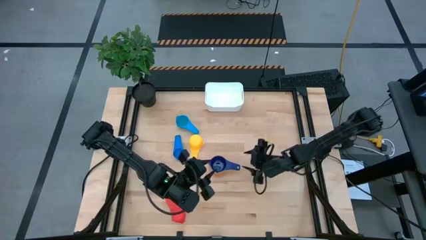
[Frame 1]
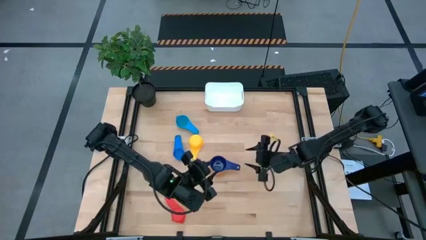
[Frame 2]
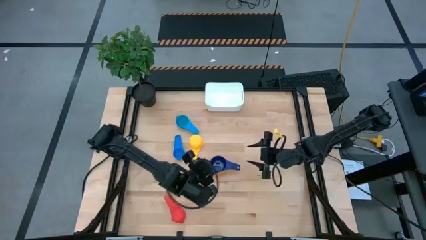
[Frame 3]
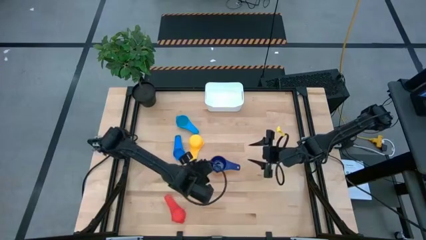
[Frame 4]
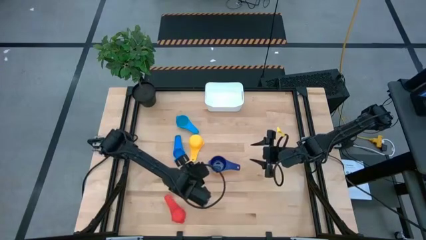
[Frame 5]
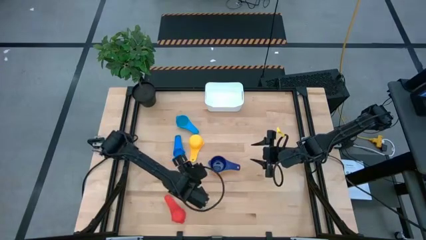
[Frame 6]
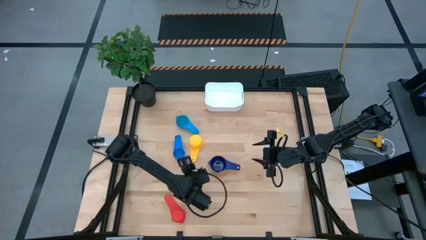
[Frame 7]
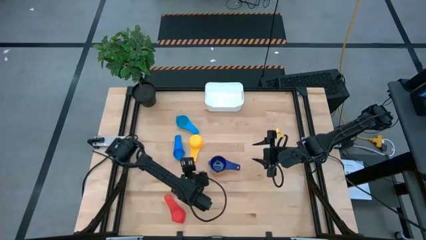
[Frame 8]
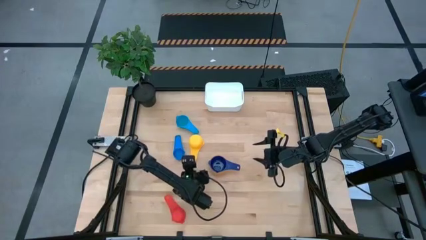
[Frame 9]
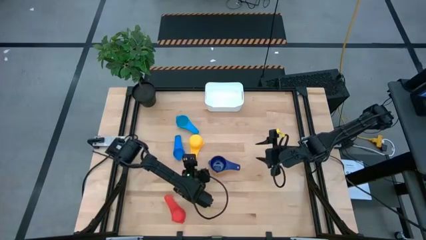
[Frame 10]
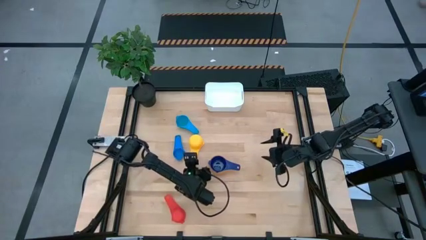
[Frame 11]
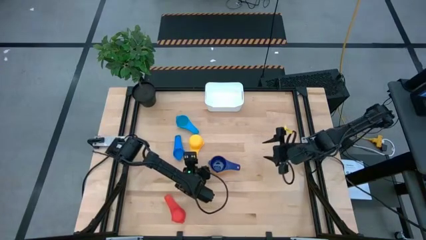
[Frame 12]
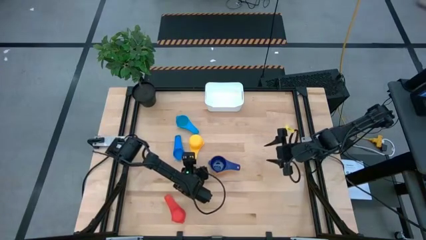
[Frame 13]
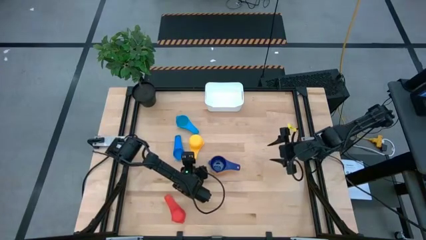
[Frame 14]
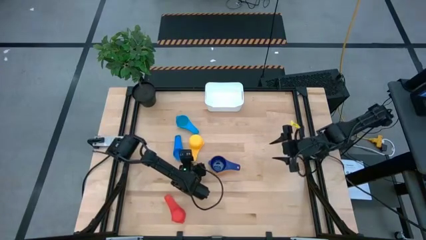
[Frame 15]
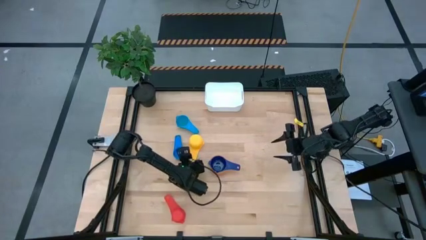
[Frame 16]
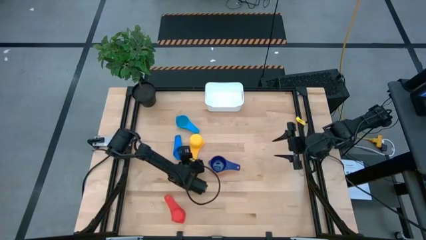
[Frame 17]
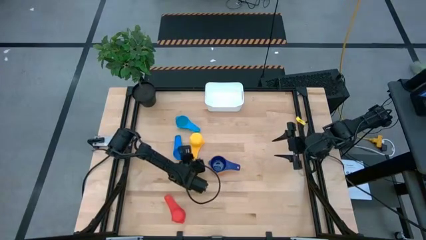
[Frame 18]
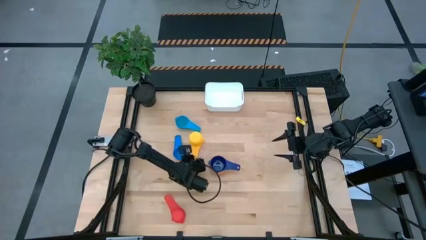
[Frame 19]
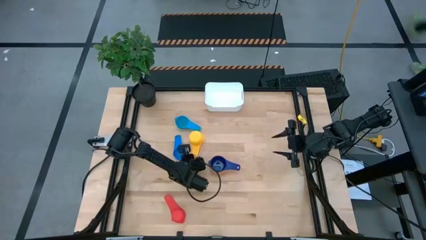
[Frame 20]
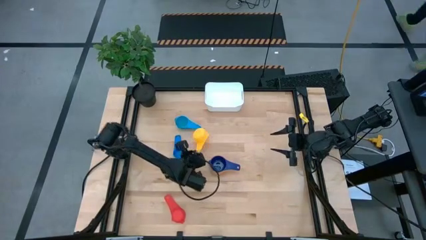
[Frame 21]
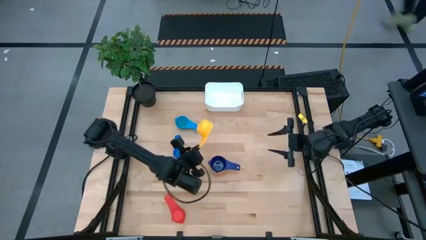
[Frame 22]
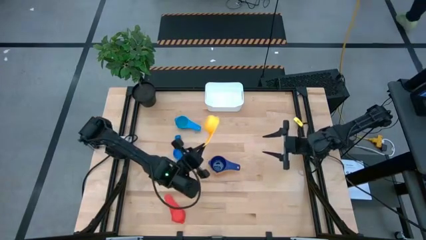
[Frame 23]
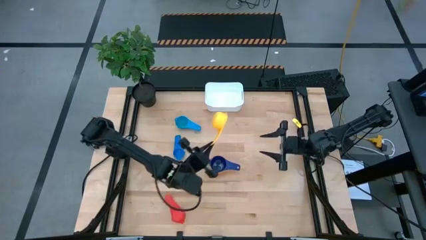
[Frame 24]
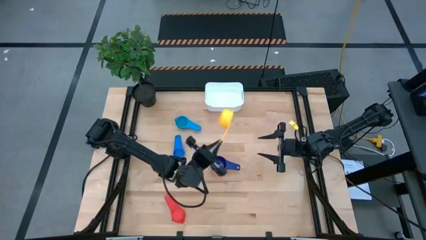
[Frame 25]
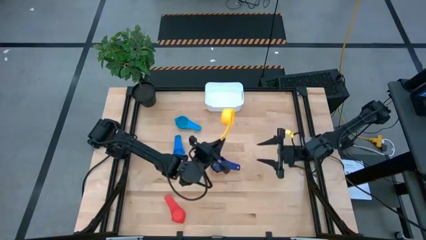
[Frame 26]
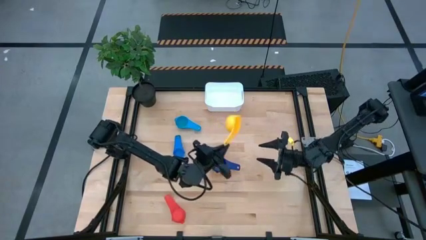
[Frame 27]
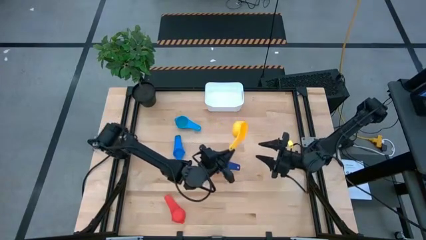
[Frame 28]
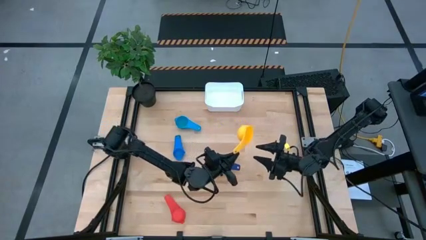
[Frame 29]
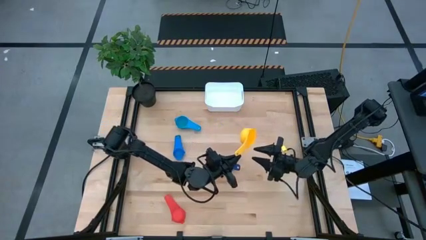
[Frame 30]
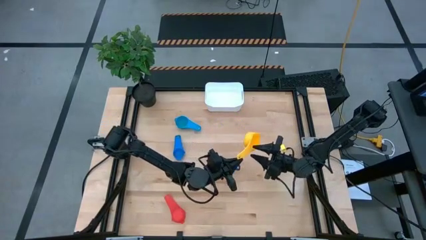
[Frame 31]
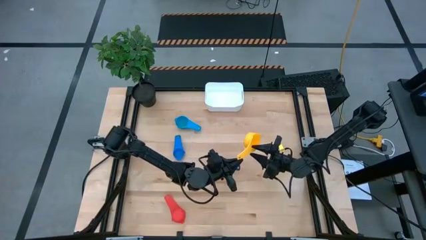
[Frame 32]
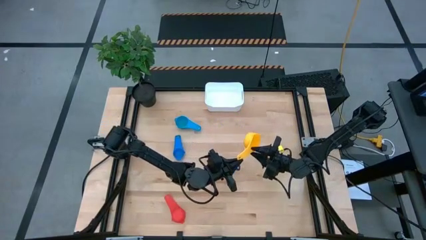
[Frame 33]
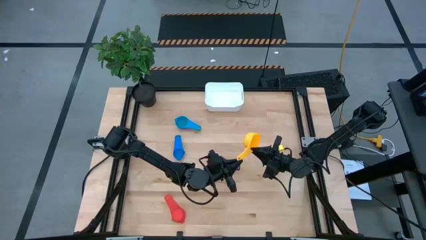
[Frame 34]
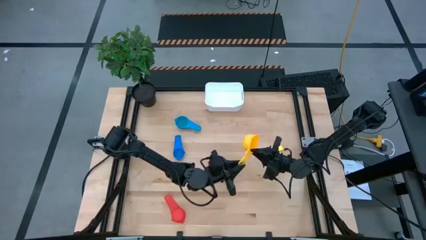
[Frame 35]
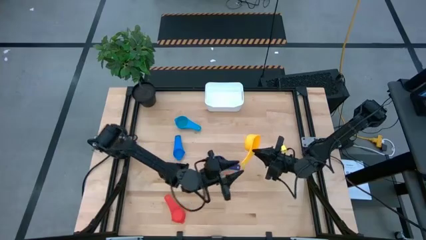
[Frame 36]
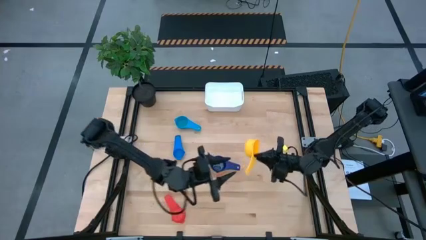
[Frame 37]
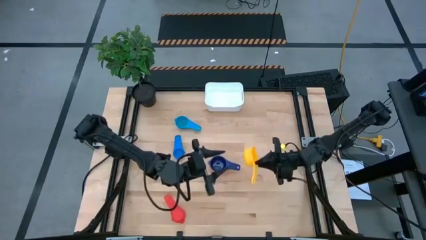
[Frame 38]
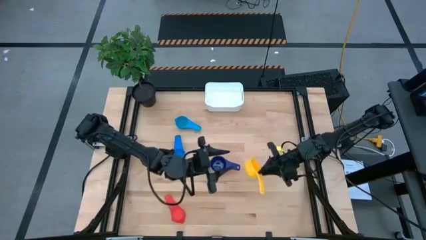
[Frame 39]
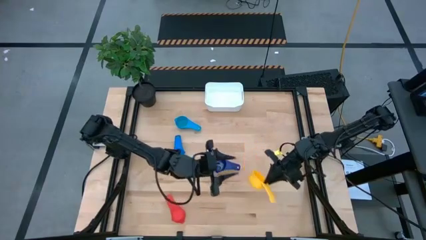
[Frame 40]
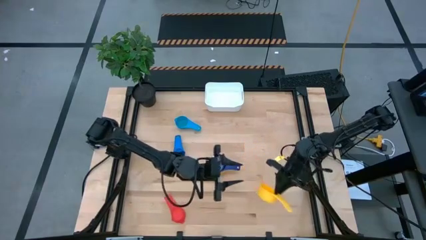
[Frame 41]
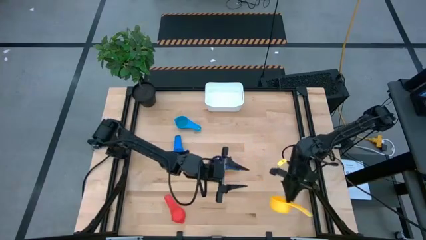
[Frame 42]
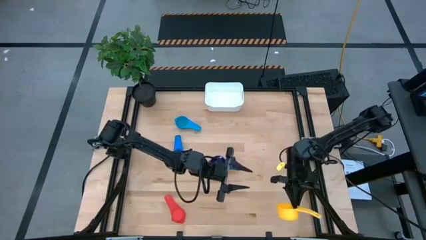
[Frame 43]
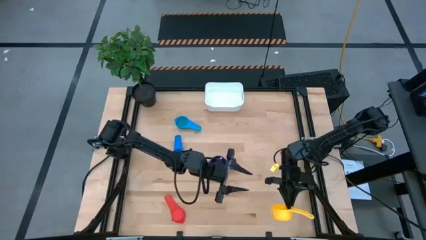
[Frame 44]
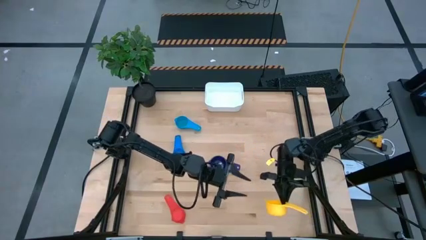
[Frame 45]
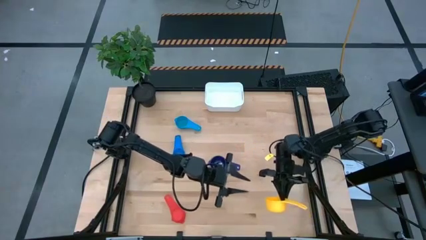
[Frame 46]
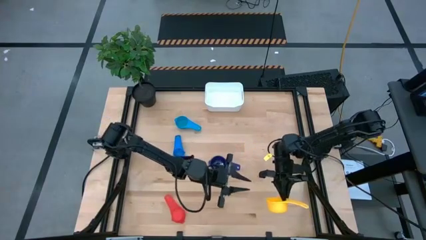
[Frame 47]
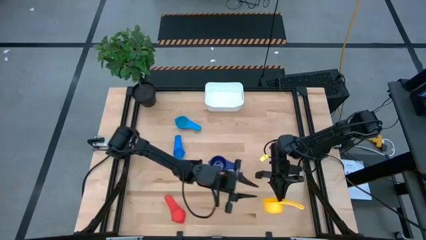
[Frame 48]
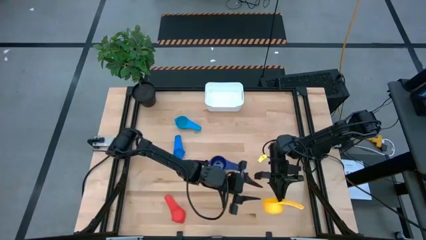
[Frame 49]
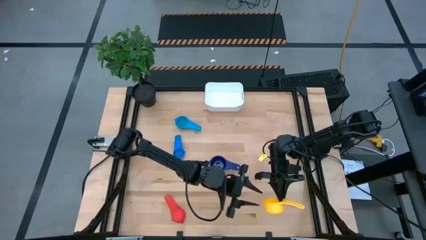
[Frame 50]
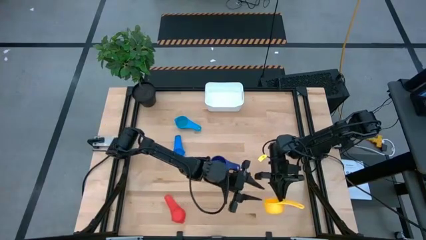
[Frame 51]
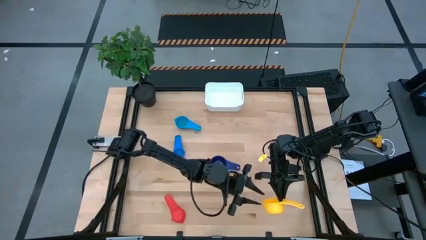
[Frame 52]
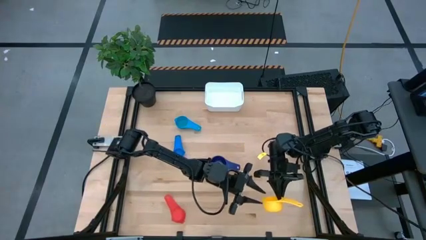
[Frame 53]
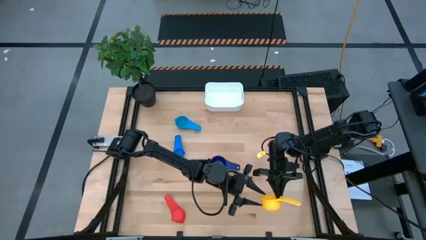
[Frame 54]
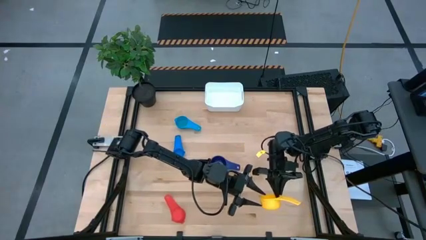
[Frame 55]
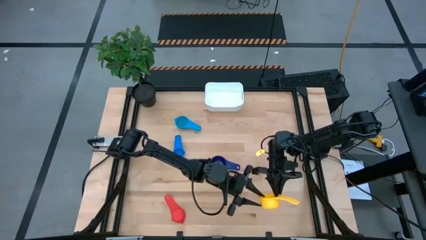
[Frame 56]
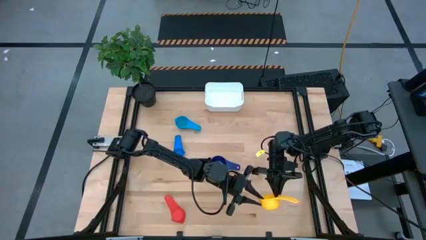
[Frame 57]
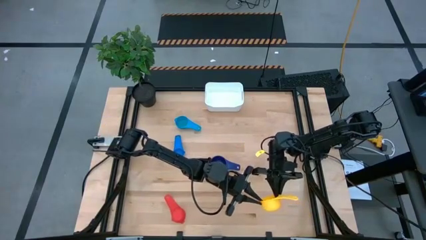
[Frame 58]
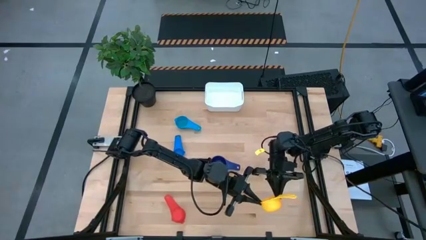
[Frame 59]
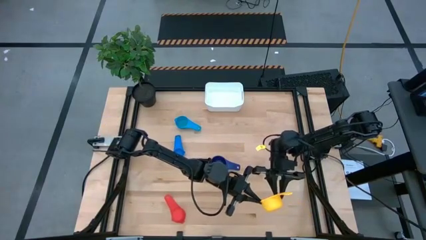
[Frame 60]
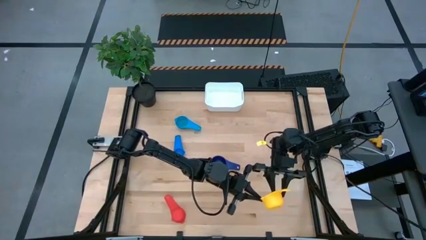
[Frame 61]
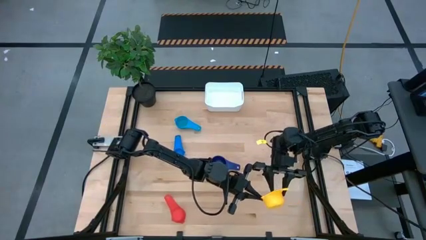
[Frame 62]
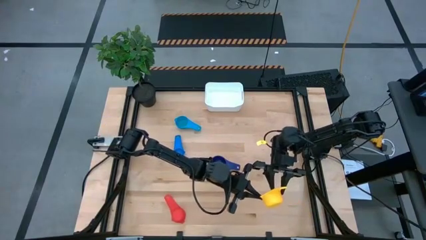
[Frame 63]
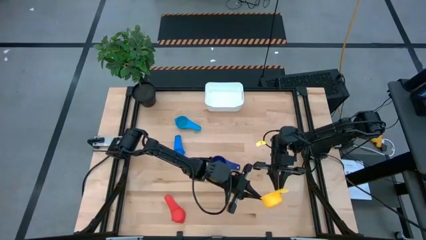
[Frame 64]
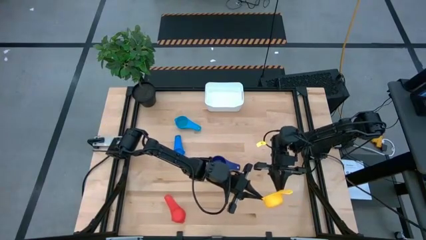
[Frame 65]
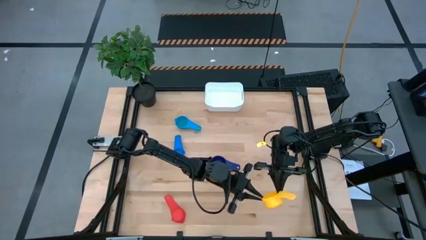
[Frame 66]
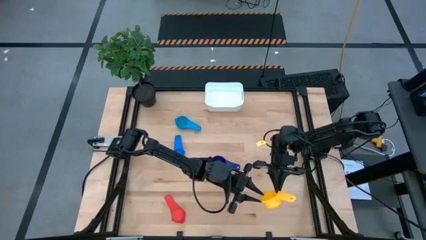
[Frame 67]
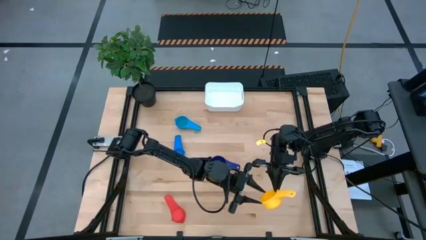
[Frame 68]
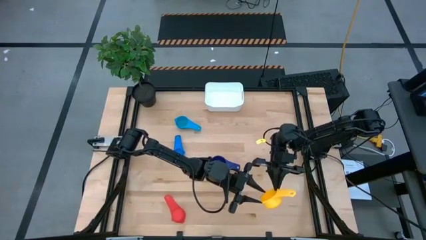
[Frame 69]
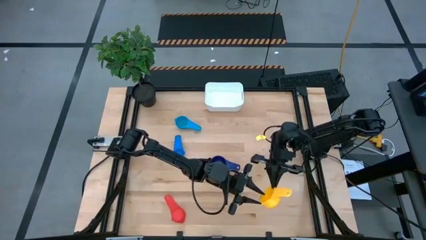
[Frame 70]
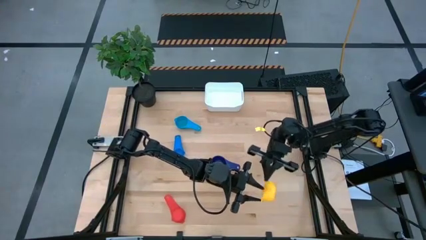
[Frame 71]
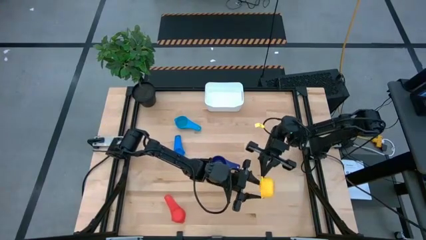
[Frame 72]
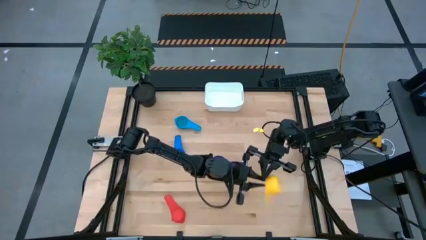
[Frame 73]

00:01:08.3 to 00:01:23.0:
Task: Nest measuring cups in basket
Stack the yellow measuring cup on top of the dark blue measuring cup

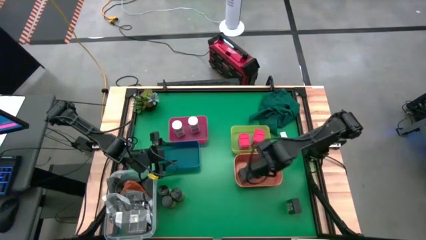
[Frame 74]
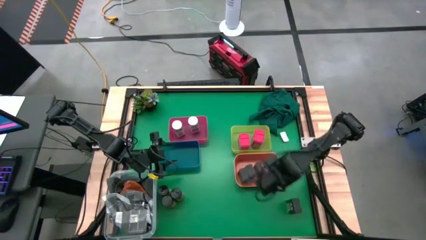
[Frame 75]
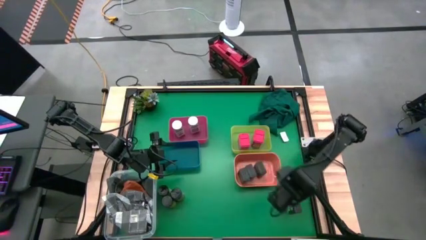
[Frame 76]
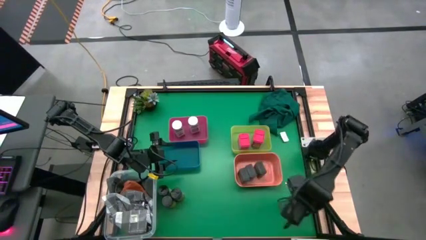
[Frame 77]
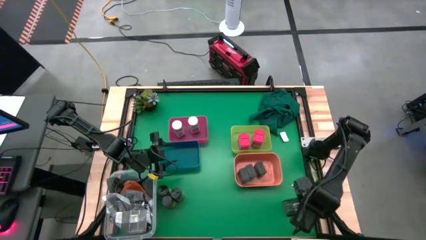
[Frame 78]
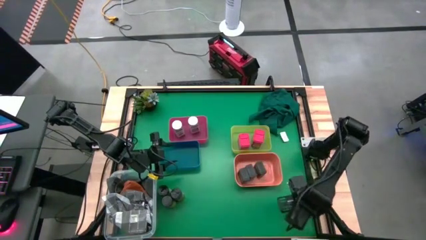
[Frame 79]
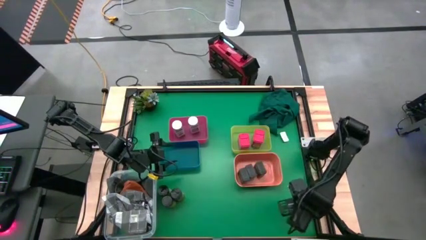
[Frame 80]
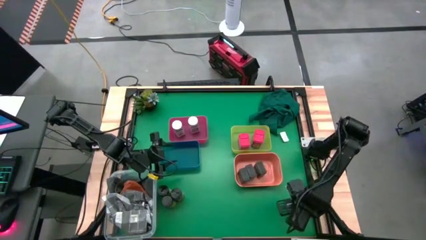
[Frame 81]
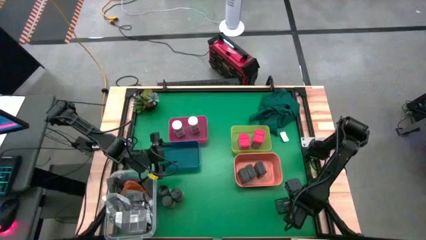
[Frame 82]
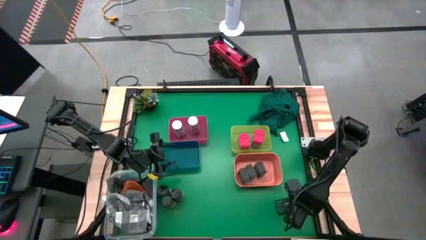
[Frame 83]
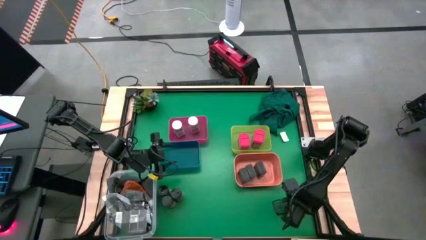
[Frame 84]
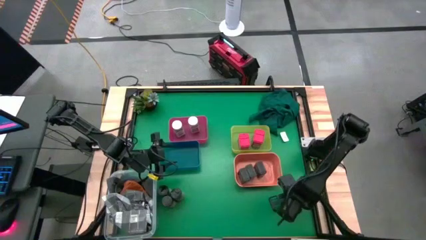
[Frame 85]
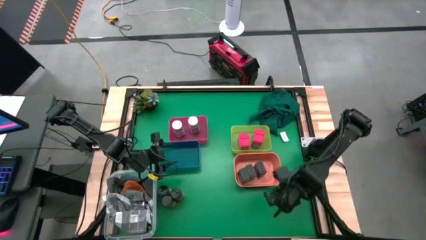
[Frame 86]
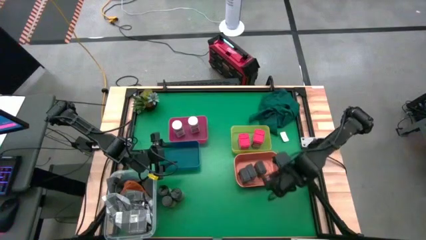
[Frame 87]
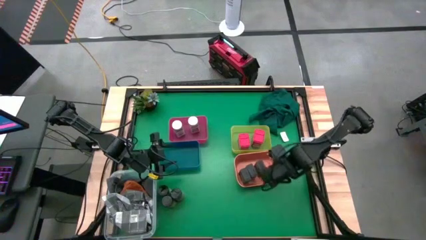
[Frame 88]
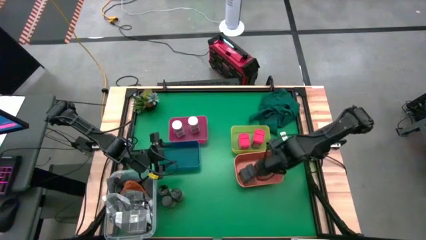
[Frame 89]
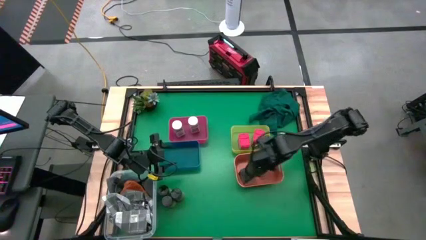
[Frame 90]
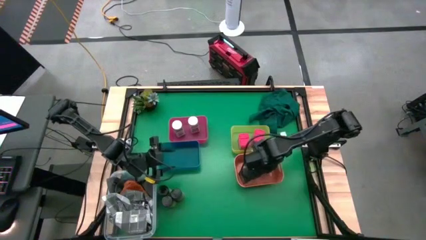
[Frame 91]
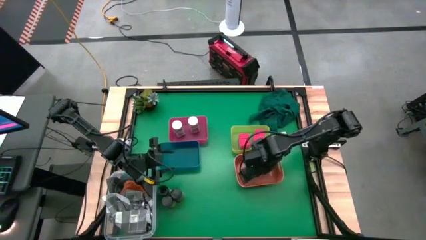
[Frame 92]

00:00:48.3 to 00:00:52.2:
Task: Sort spices by type
Put the black seasoning can into the orange bin
